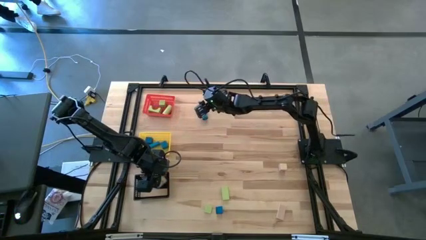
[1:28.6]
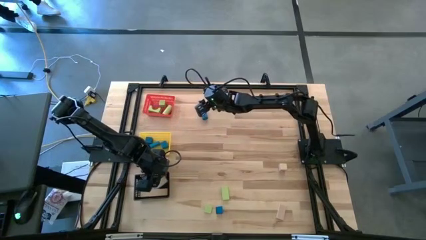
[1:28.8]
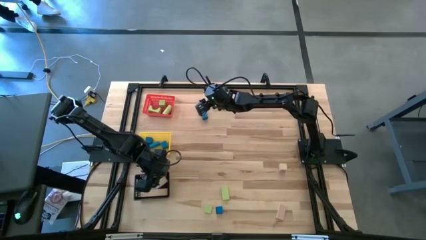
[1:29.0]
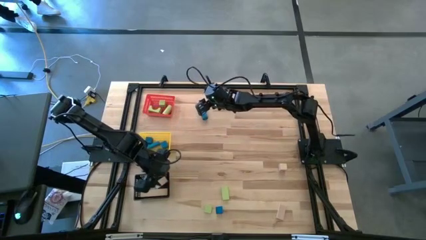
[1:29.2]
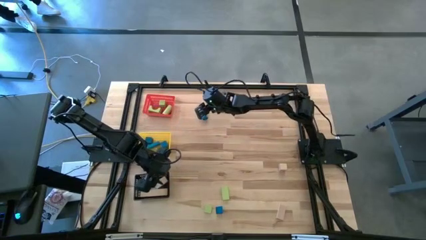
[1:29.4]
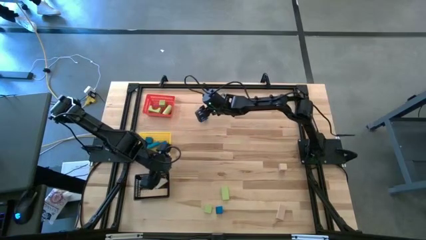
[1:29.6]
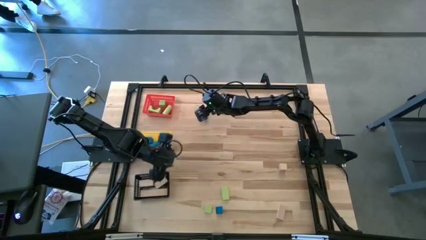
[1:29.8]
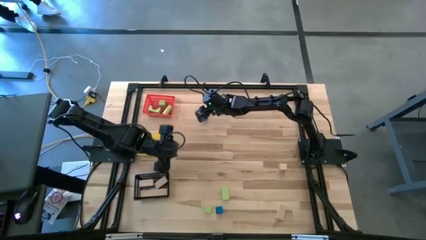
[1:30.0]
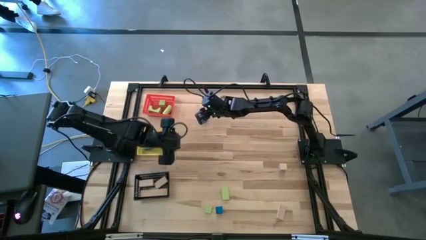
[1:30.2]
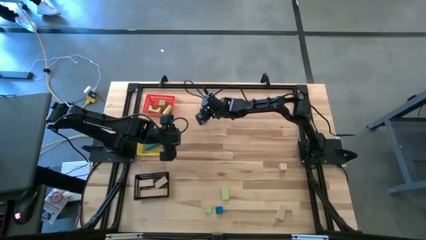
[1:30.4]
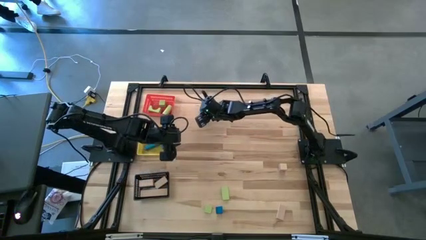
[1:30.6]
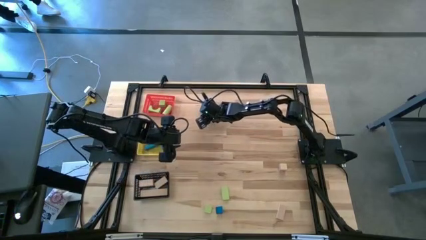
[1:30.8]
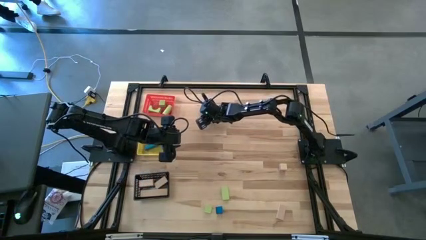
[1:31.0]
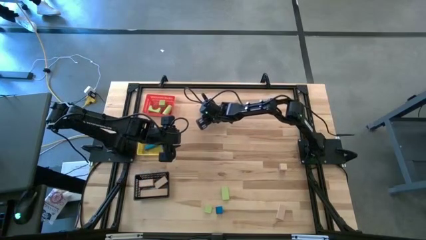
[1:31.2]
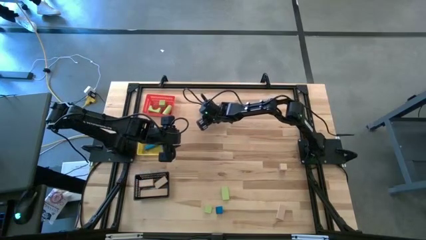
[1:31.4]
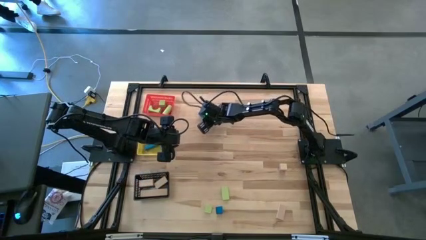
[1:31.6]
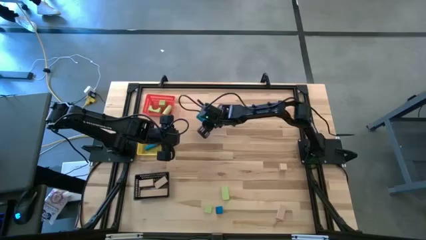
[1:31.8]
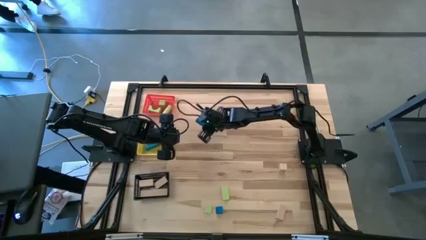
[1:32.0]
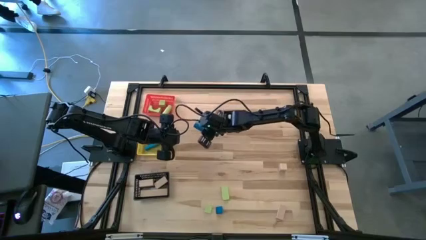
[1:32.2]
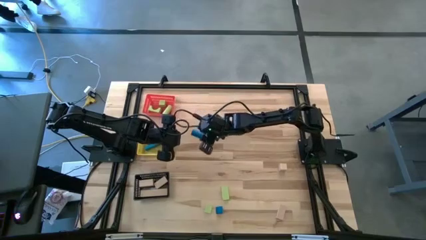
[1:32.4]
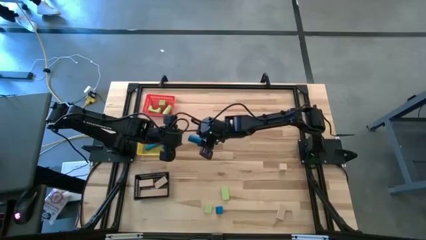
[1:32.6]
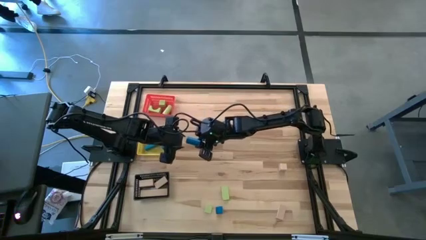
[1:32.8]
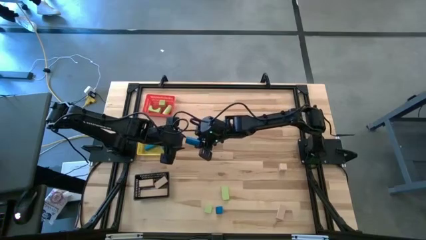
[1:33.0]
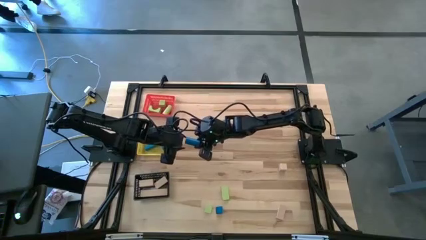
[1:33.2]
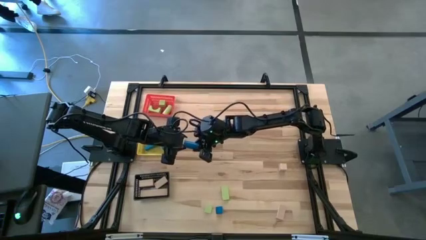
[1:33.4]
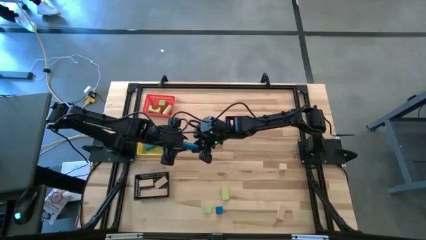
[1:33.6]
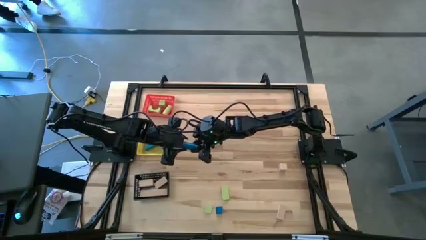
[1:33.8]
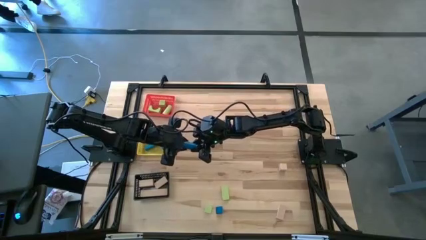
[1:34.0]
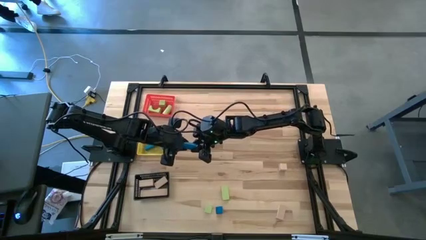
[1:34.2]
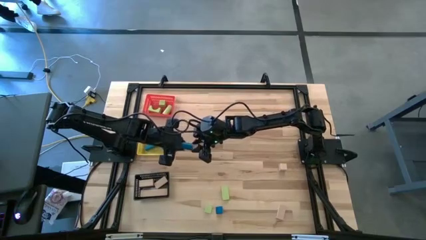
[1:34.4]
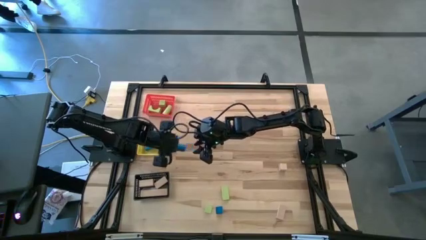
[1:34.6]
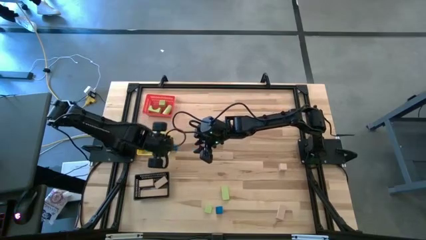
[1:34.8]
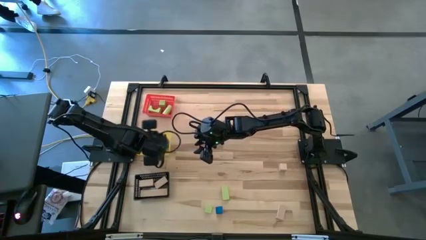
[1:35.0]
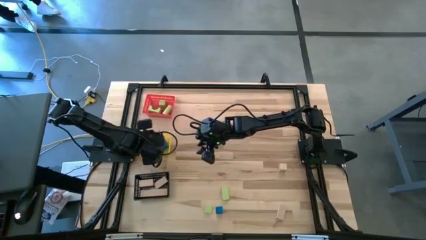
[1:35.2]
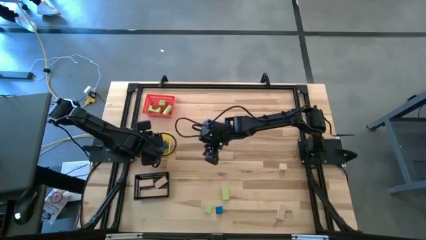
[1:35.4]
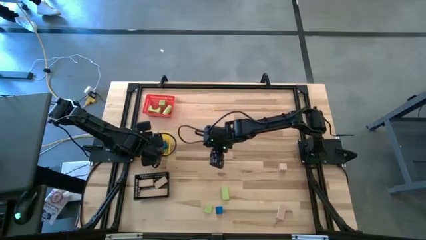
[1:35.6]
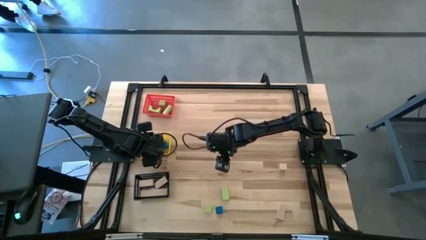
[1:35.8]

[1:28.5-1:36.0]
Task: Sort & place blocks by color
Put the cylinder blue block into the yellow basket

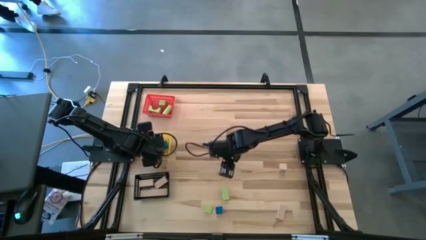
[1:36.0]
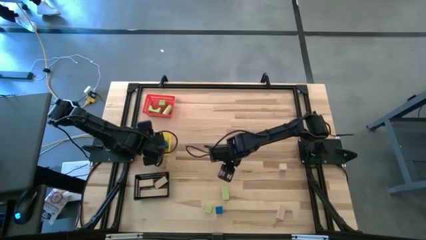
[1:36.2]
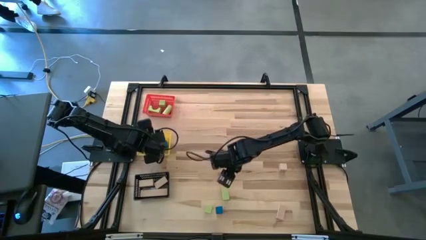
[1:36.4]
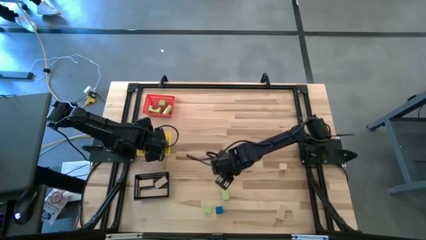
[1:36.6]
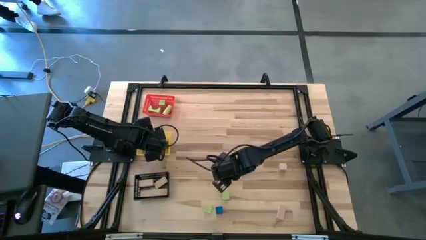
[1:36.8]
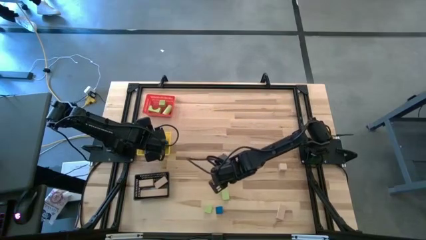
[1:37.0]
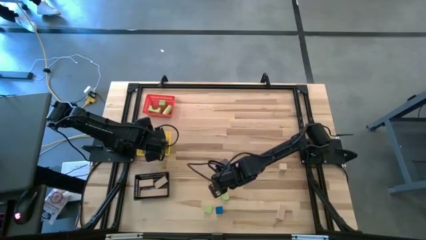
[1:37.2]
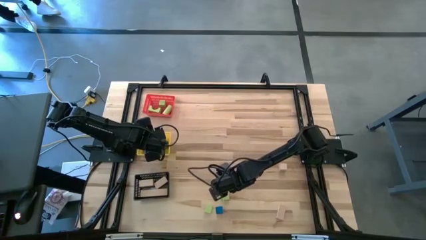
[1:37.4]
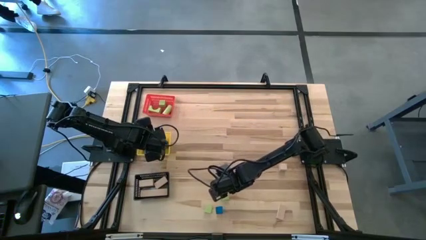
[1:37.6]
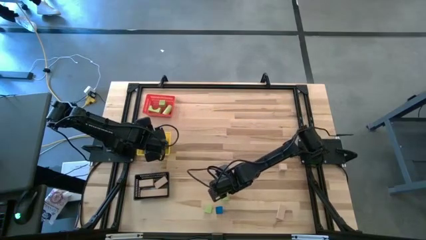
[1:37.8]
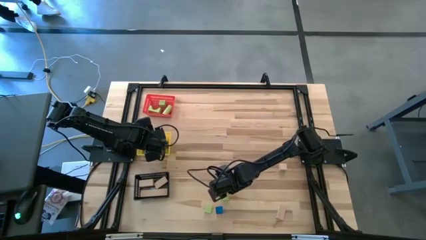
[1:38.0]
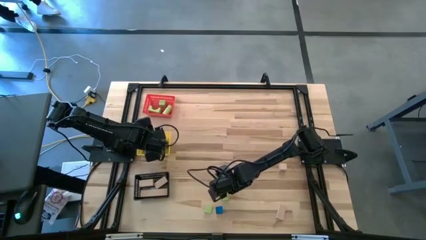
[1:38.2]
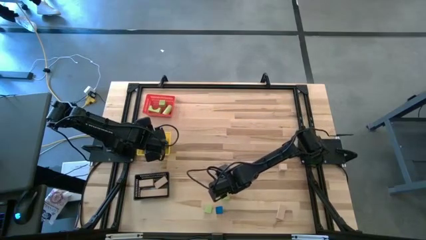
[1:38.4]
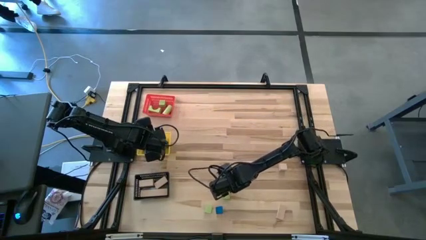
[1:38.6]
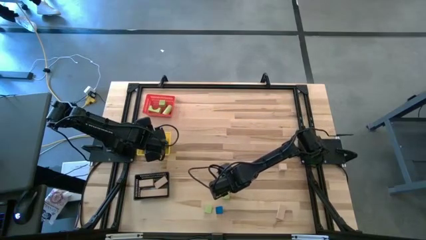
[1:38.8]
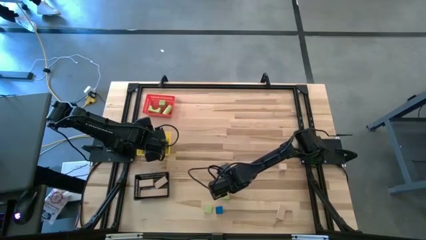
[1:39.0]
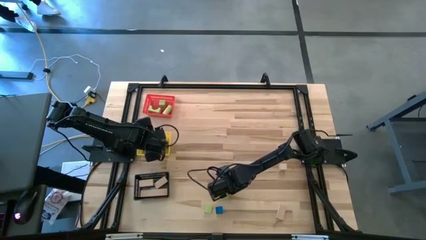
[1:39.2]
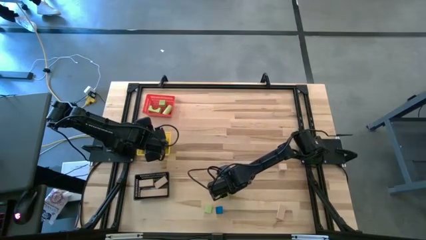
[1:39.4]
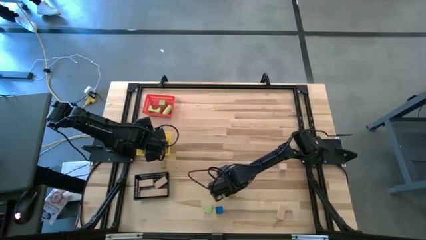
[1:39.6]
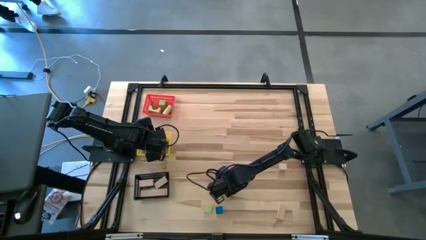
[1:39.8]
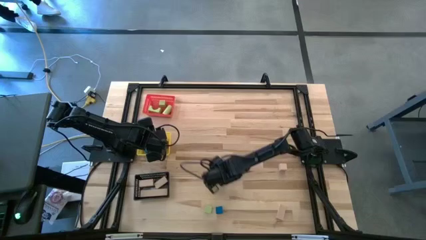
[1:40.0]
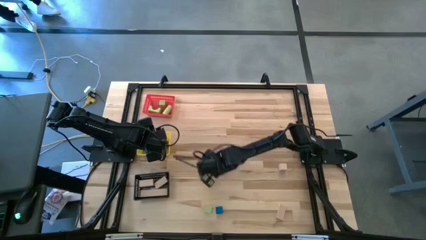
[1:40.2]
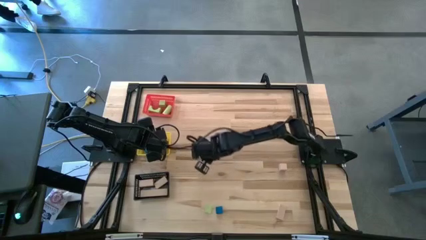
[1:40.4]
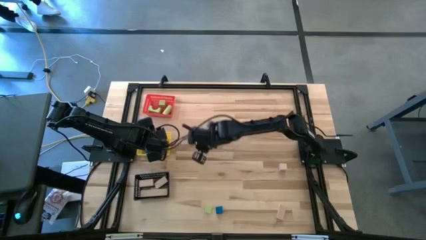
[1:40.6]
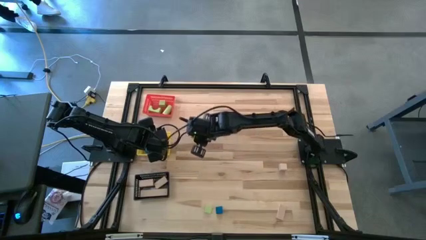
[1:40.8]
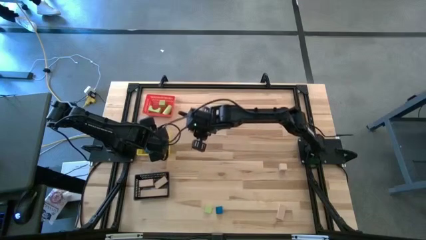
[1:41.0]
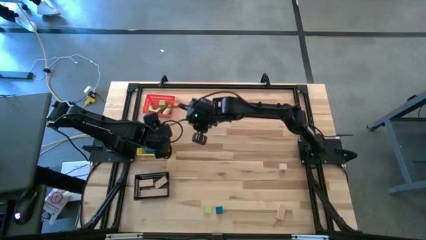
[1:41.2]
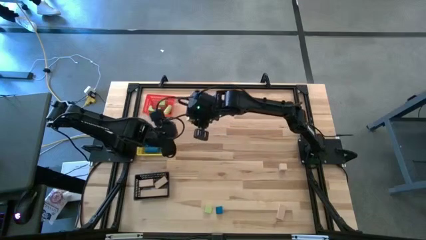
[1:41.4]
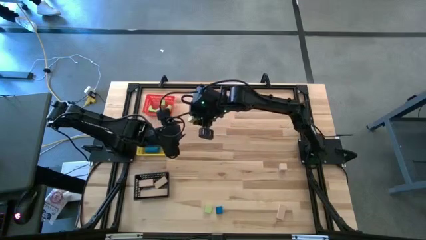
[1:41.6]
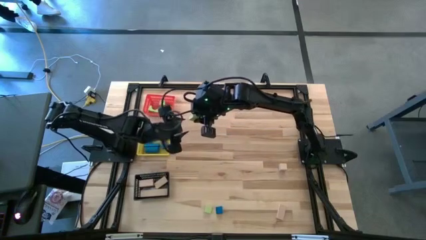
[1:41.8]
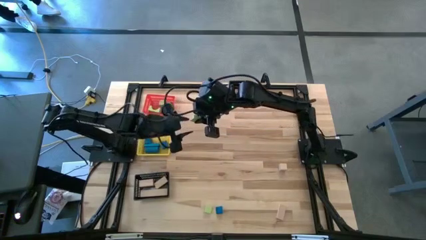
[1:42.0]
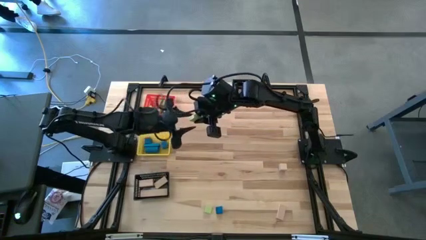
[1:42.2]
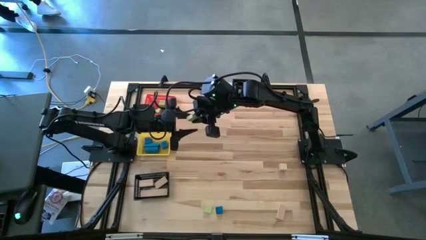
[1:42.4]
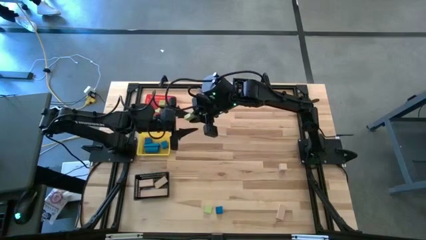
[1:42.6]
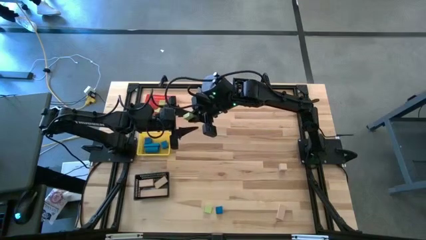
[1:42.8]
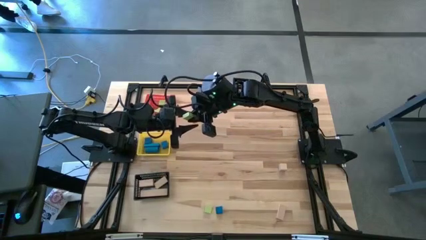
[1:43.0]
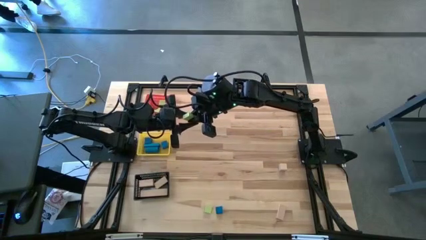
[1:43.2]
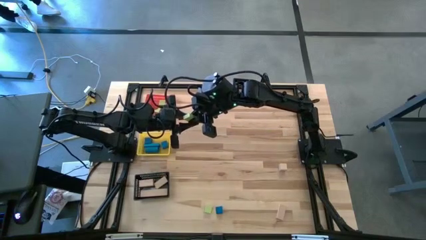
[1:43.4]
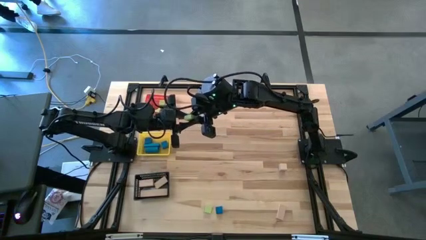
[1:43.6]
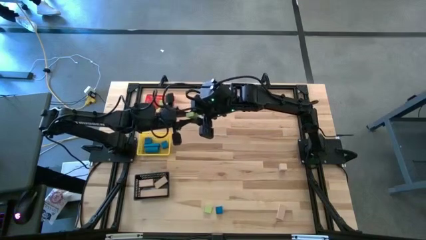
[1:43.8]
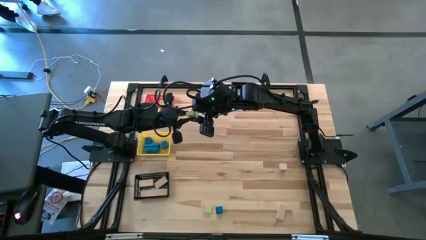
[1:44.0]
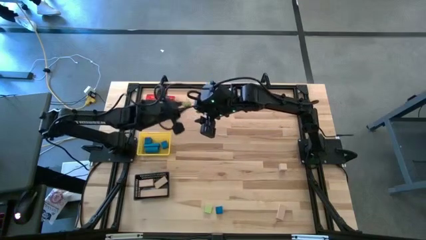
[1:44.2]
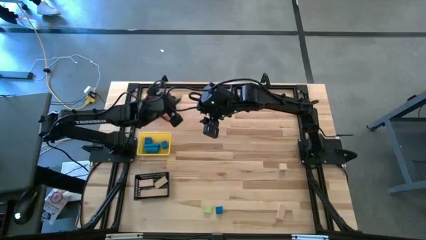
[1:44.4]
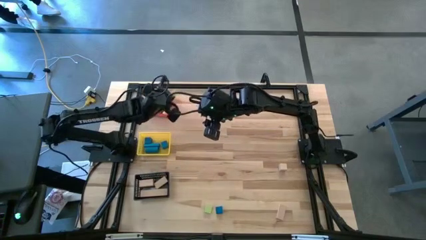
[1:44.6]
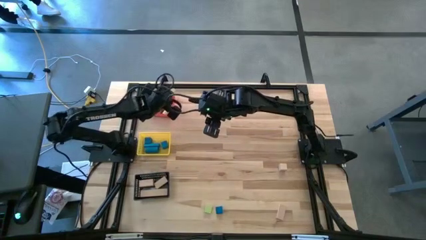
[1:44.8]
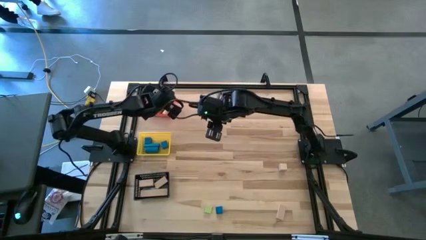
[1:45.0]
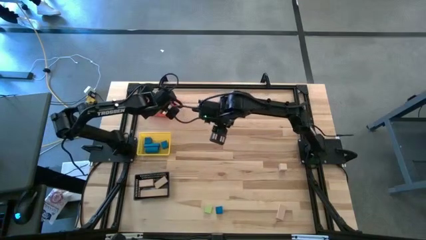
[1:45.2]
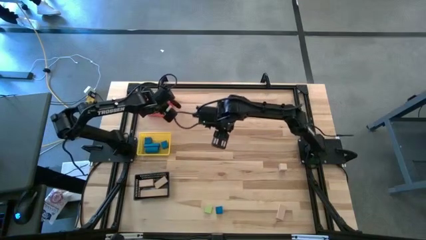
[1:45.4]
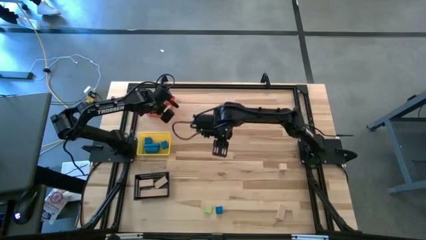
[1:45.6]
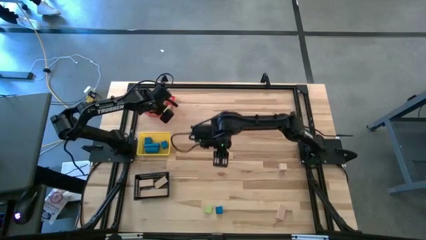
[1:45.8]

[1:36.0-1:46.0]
Put the rectangular green block into the red basket
